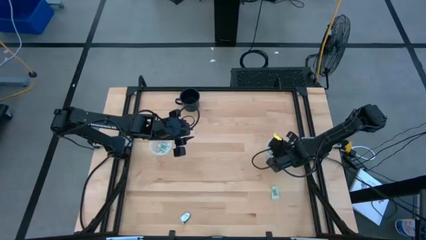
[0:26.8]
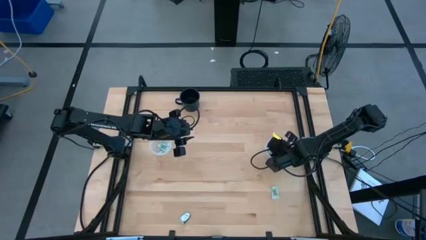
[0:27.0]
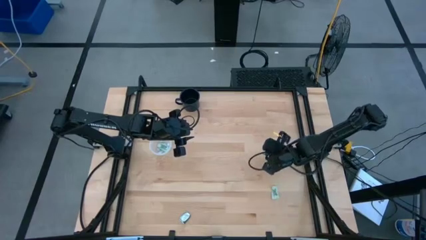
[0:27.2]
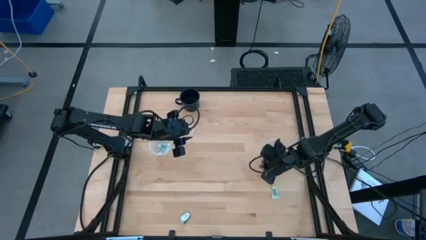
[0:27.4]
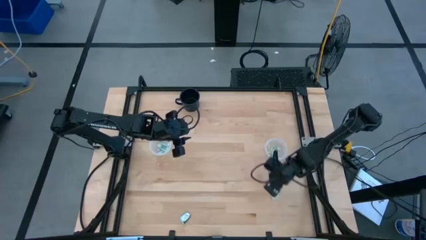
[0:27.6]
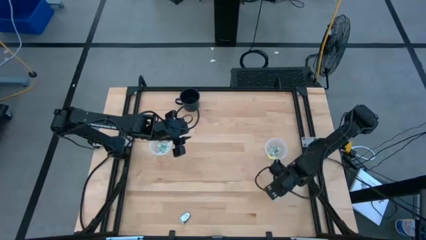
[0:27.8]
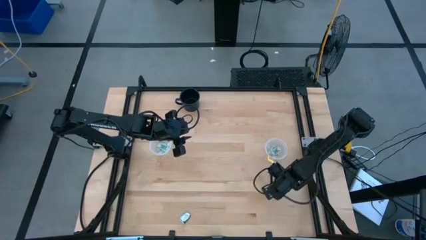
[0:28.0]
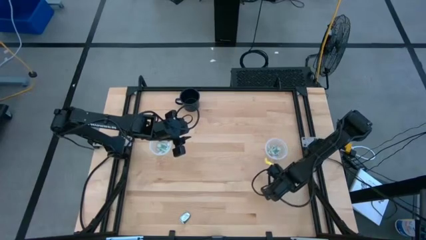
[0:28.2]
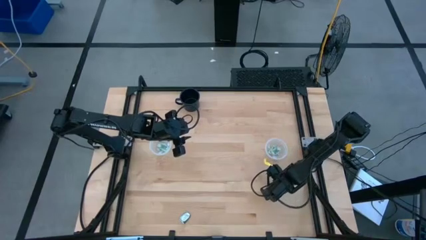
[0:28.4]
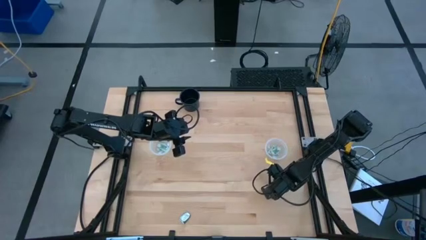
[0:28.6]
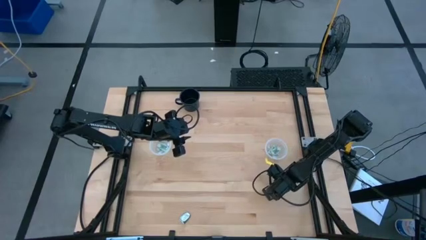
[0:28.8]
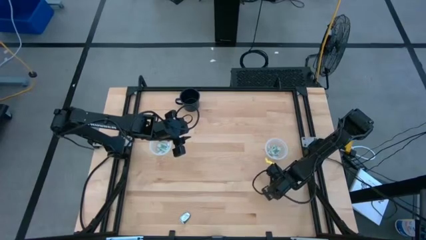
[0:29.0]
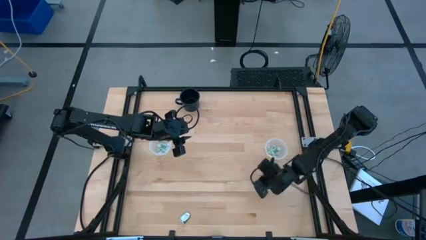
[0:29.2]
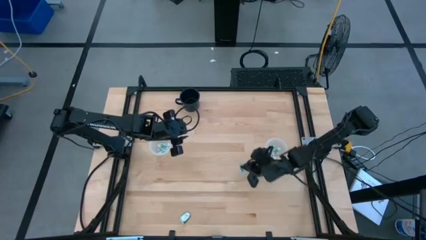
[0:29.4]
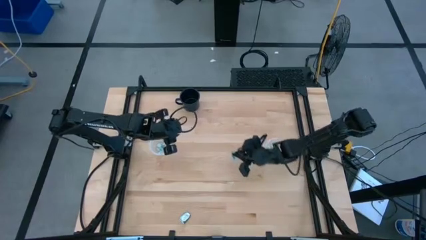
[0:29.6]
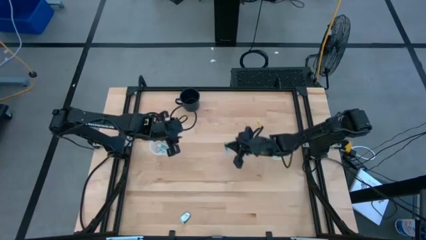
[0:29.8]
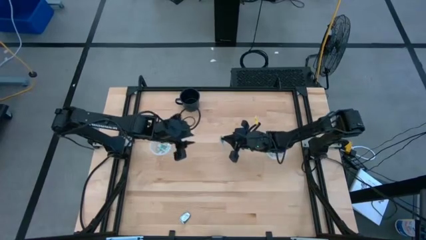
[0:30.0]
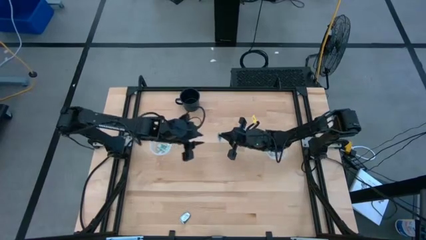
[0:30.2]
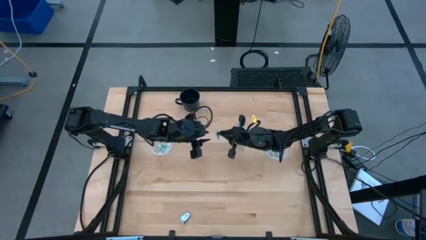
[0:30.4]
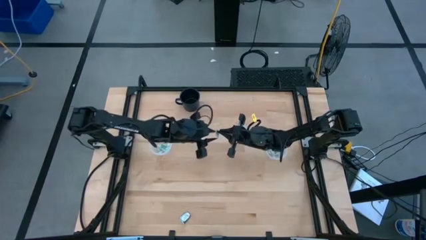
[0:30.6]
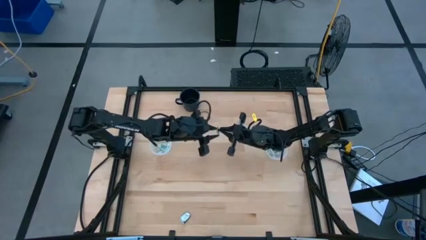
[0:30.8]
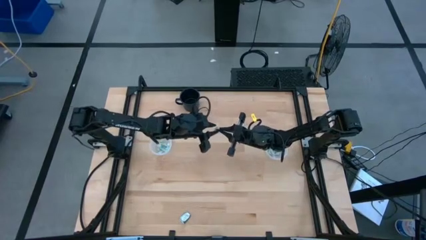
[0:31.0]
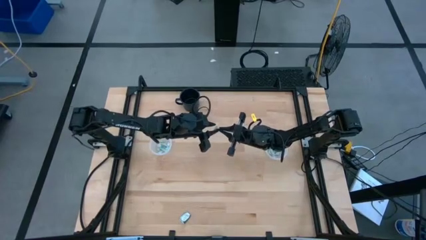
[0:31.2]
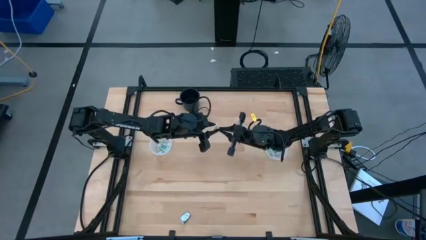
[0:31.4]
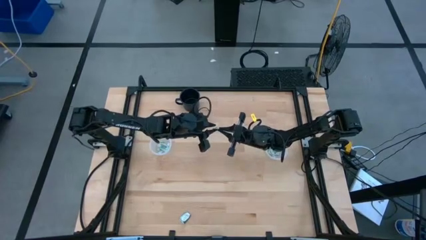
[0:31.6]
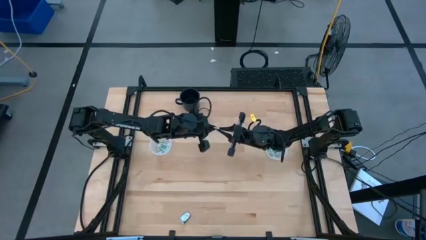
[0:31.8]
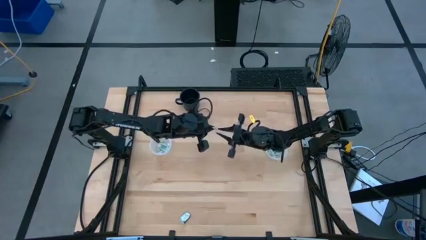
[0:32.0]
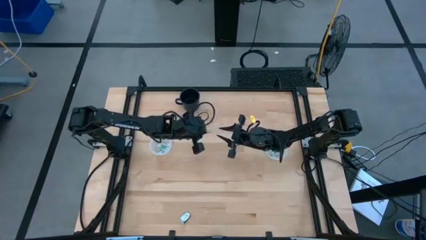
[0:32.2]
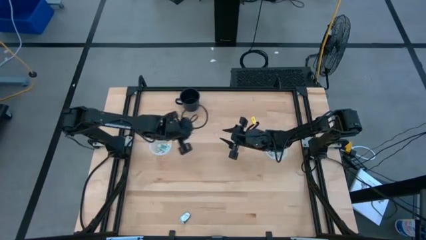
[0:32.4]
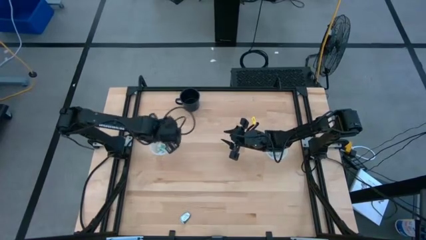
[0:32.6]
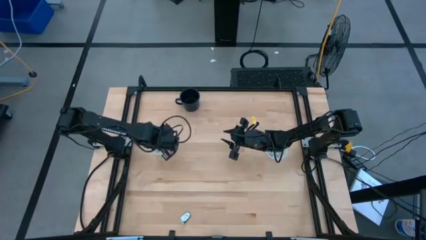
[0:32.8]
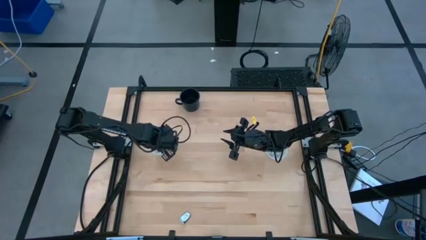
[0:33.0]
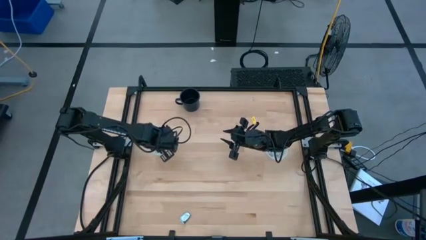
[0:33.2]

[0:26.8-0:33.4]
Task: Pick and place Stevia / Truvia into bins
Put the stevia packet into the left container

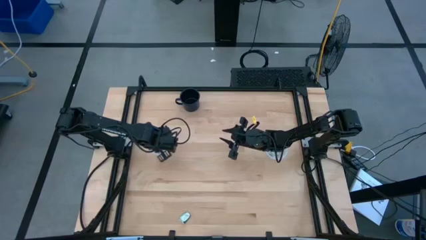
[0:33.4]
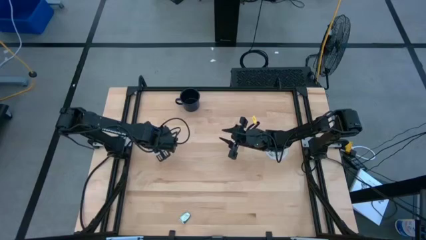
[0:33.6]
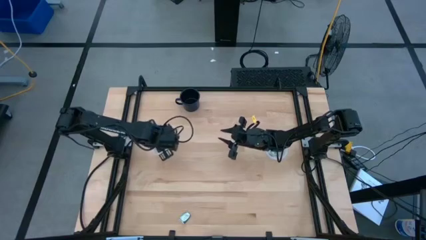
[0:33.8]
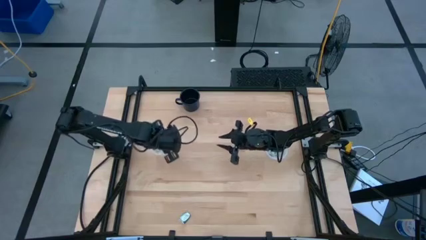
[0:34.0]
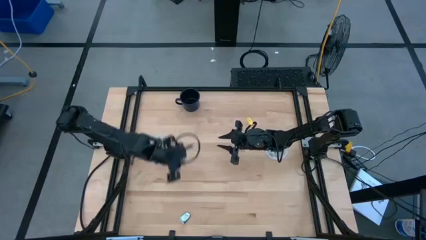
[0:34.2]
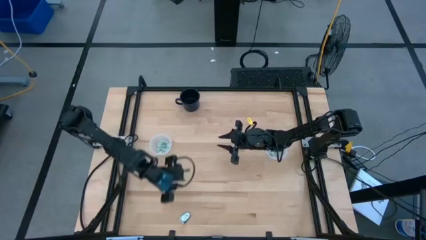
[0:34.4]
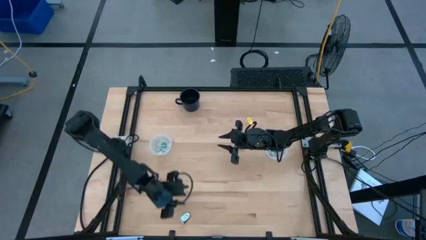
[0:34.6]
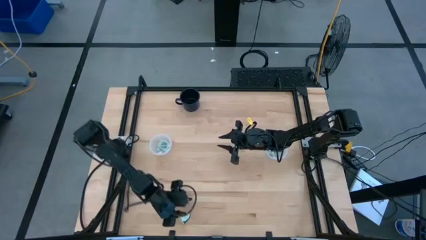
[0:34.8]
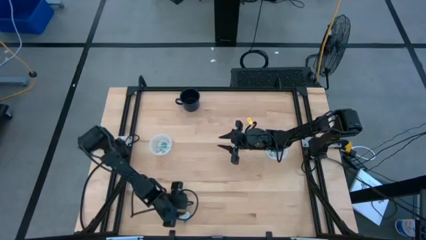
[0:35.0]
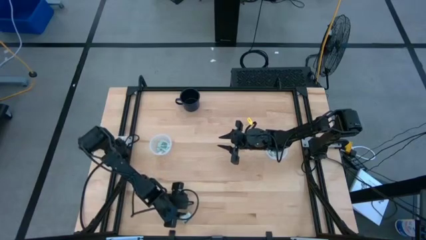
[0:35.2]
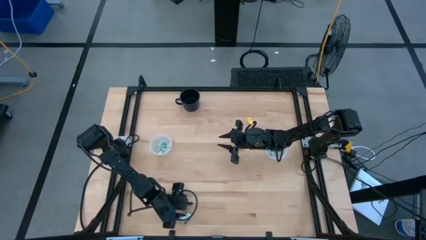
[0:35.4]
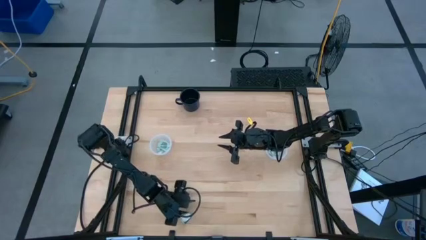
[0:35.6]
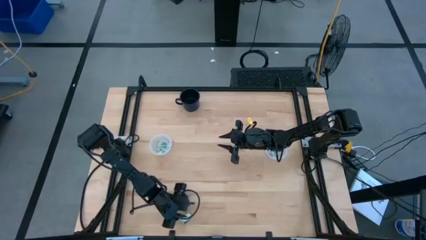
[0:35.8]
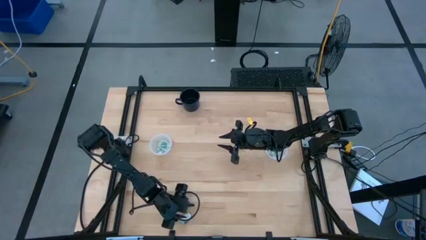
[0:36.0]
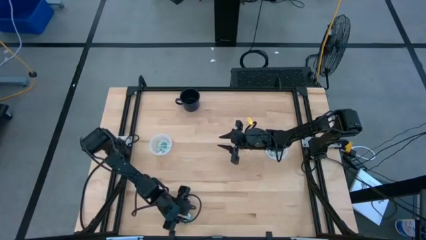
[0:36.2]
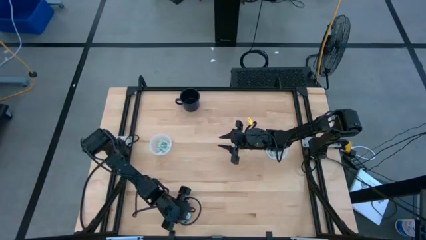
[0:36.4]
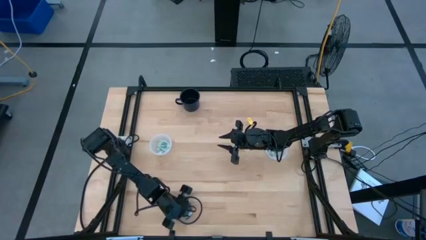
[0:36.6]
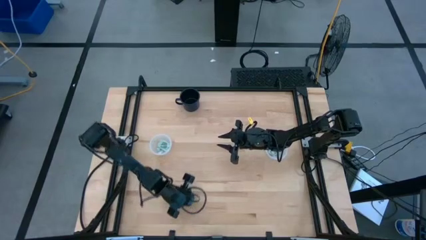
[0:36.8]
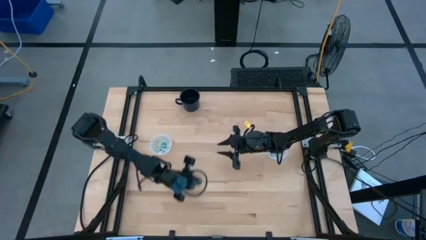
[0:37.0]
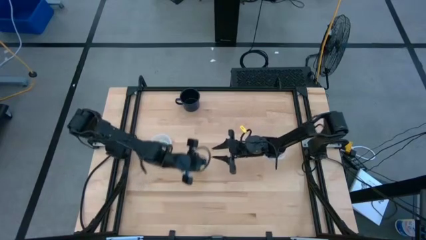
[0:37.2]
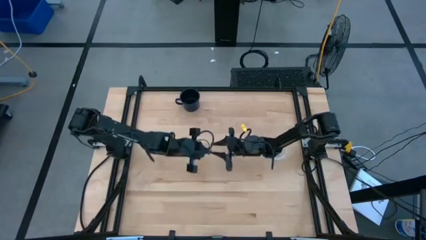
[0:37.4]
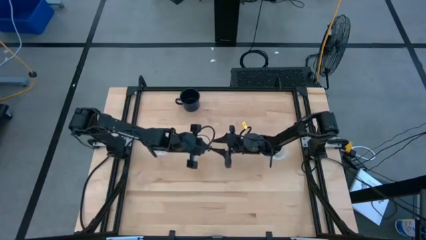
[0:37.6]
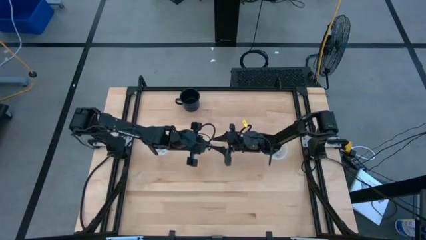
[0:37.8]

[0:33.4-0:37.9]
Put the stevia packet into the right container

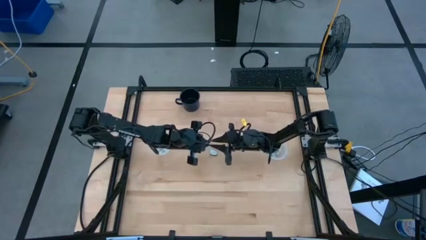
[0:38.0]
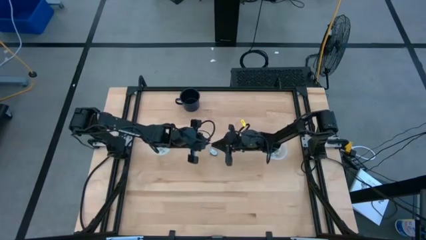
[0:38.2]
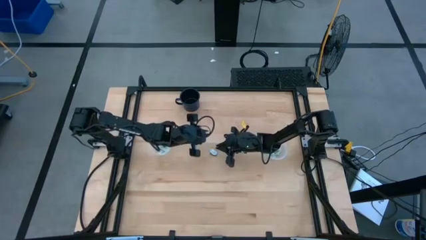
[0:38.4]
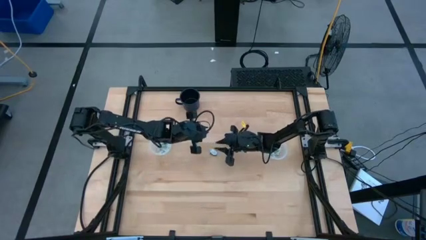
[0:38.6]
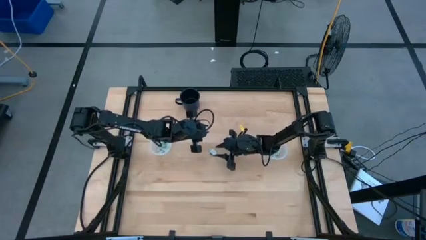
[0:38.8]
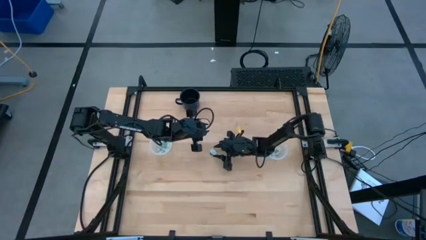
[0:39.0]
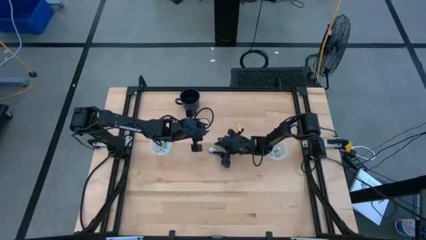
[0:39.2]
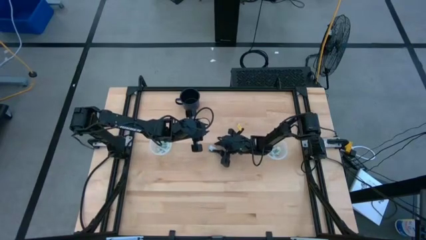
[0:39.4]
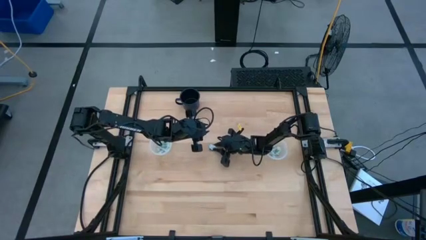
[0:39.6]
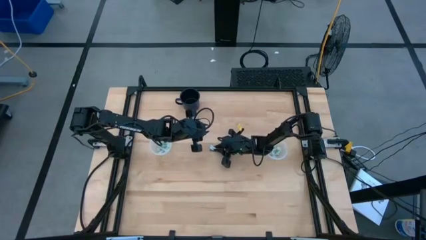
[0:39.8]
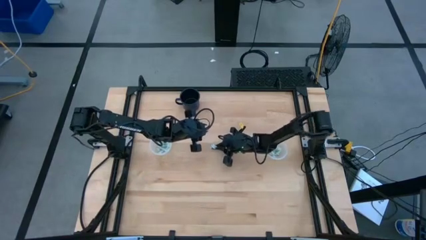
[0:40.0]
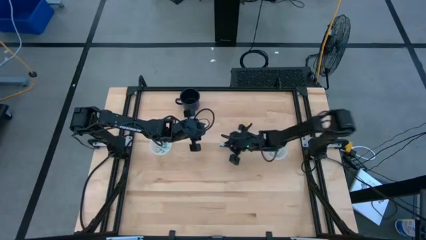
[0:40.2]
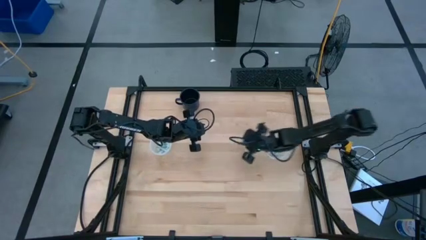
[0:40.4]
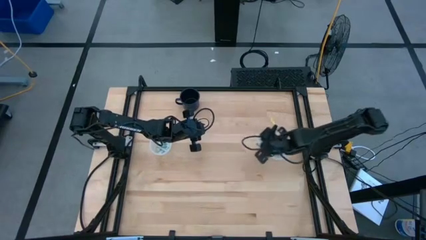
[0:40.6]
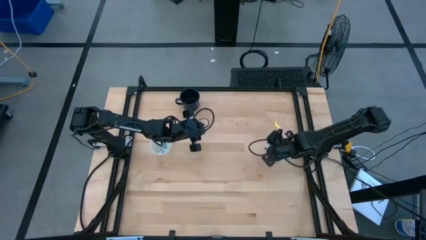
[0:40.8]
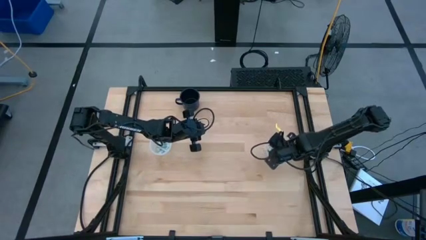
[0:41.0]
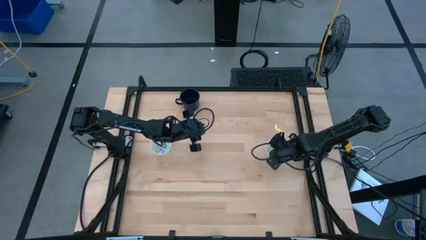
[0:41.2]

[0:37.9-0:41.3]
Put the stevia packet into the right container

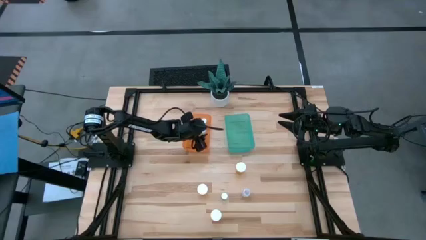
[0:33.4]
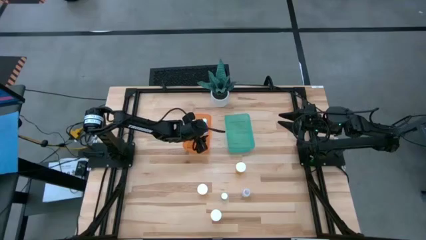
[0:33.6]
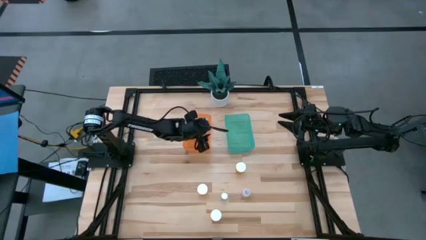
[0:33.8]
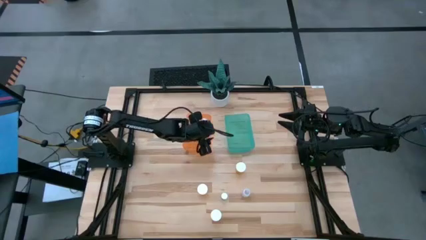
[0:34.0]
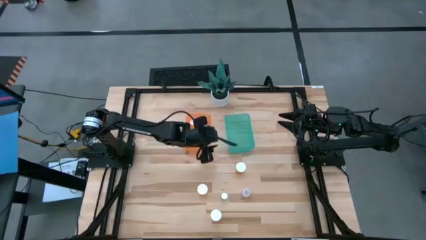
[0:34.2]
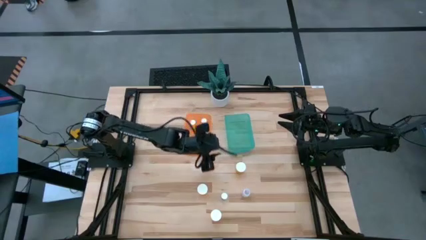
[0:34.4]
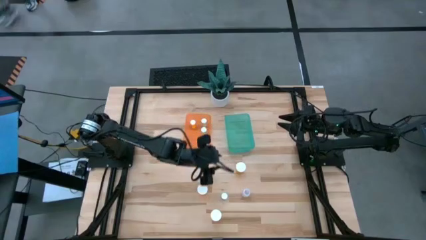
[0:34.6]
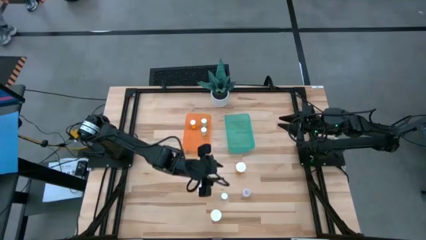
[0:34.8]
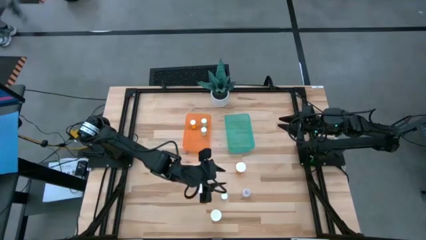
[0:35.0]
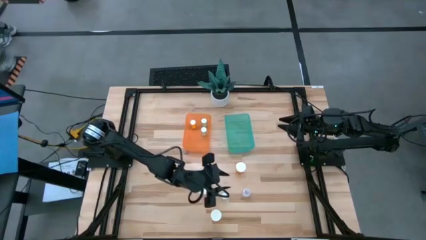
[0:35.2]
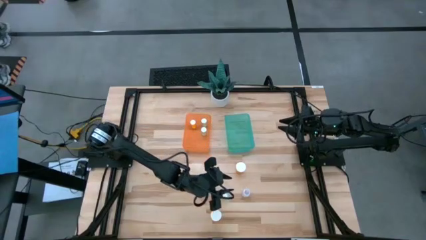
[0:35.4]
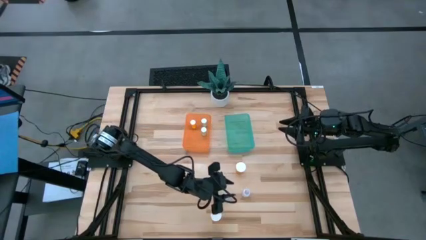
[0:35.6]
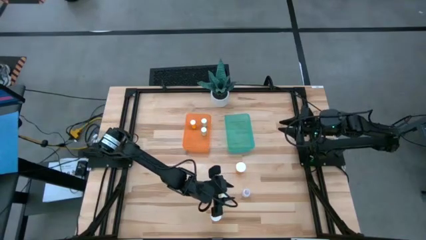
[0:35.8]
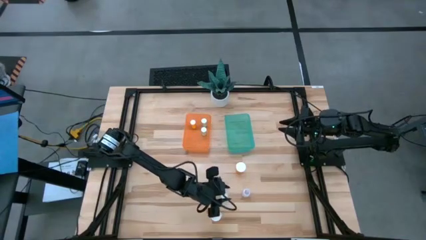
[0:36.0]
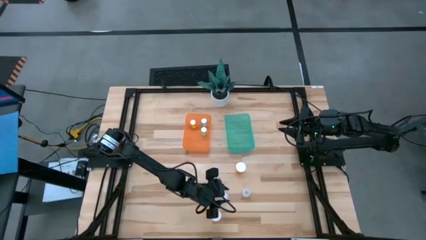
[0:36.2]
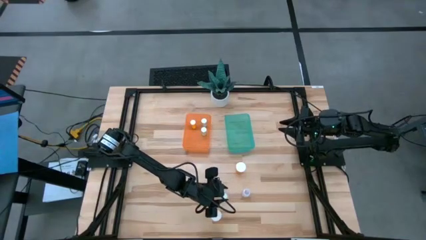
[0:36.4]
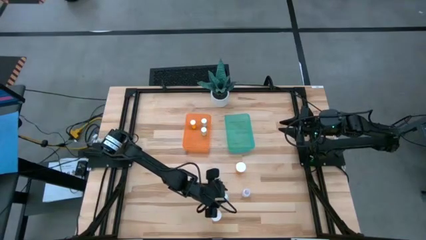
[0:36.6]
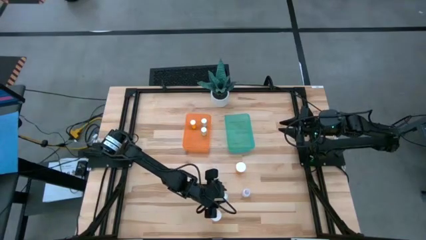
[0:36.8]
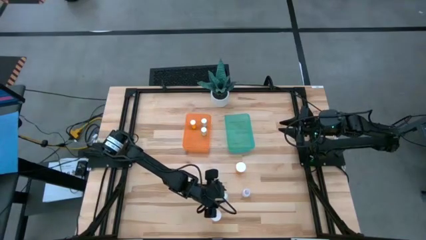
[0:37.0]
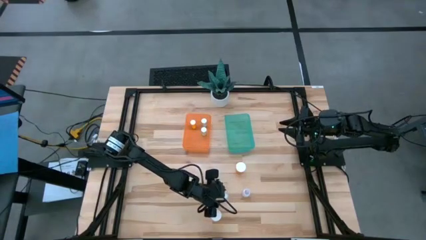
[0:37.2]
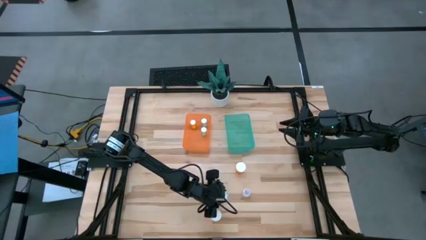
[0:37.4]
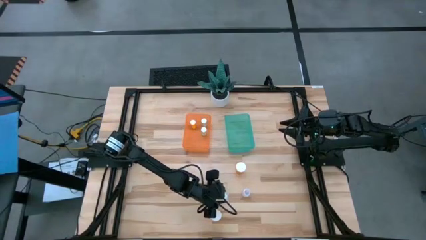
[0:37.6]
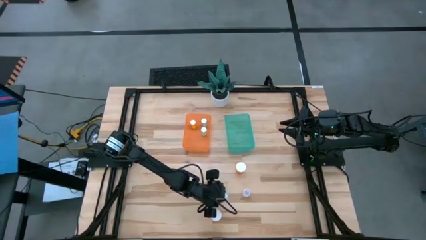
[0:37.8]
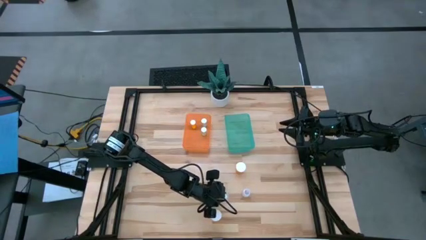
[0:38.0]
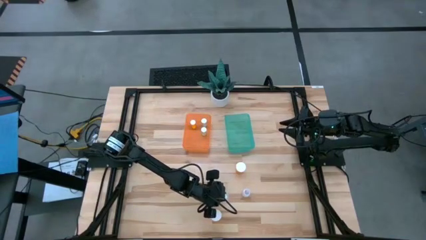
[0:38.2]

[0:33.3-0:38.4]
Task: Pick and place medicine bottles into bin by pill shape (circle, oval)
Put the blue pill bottle into the orange bin
